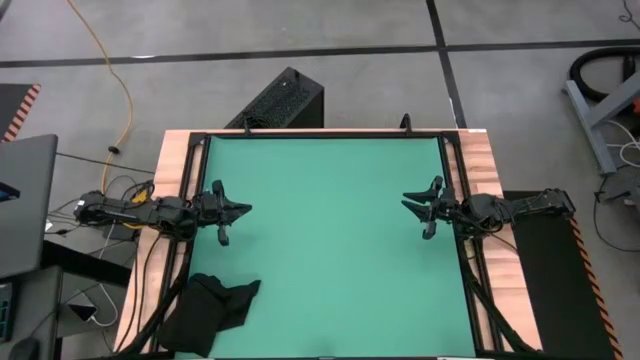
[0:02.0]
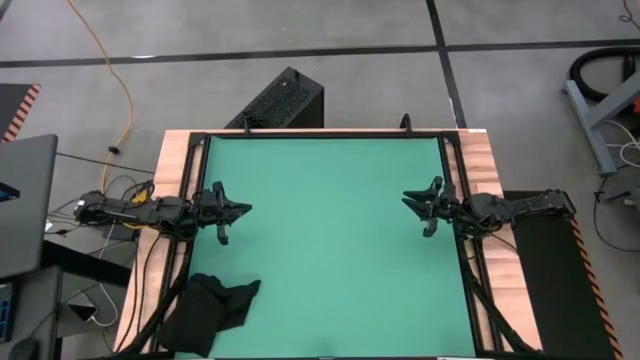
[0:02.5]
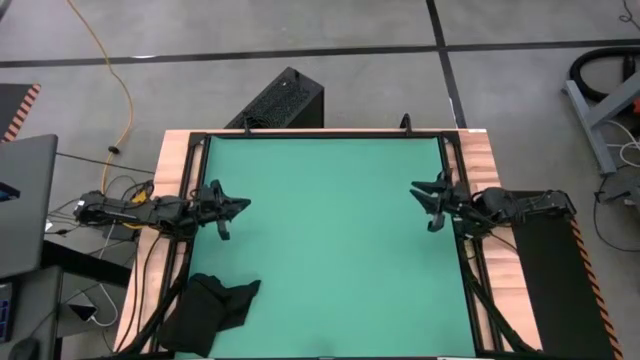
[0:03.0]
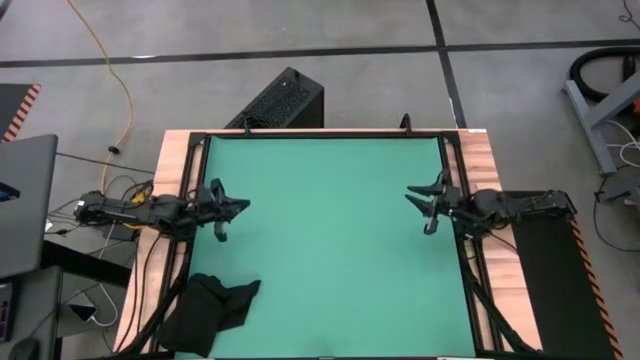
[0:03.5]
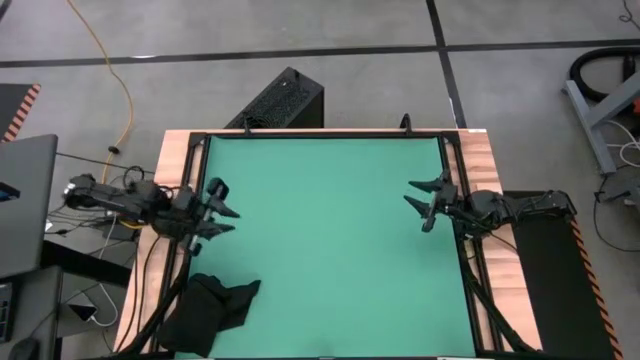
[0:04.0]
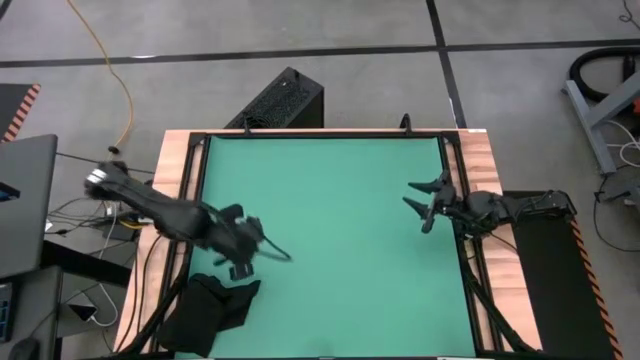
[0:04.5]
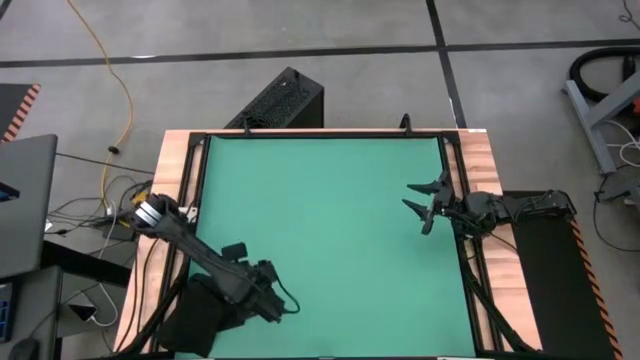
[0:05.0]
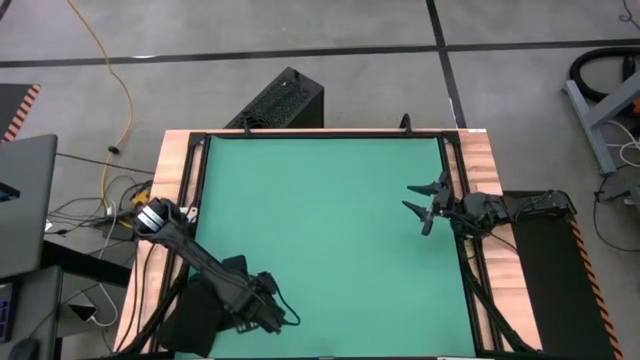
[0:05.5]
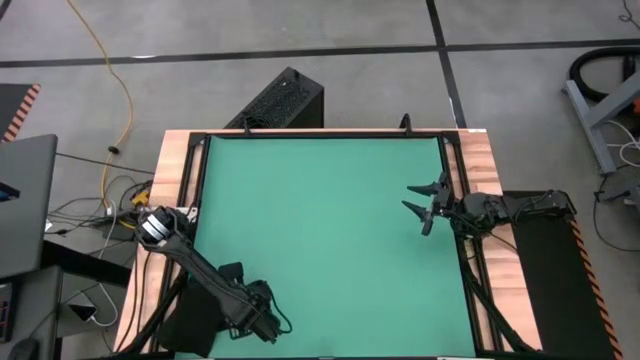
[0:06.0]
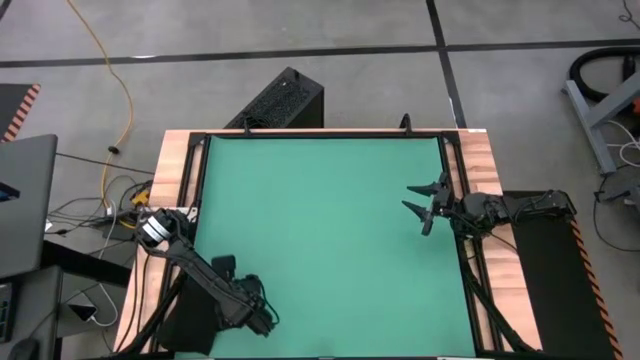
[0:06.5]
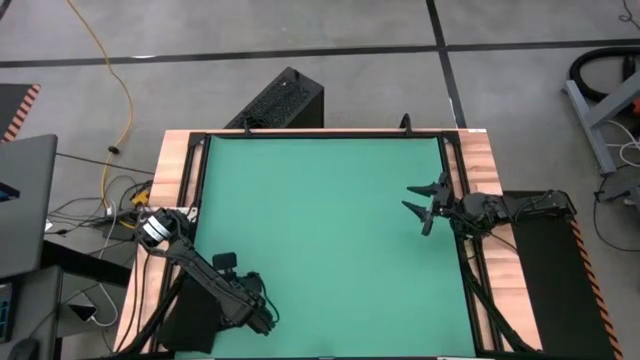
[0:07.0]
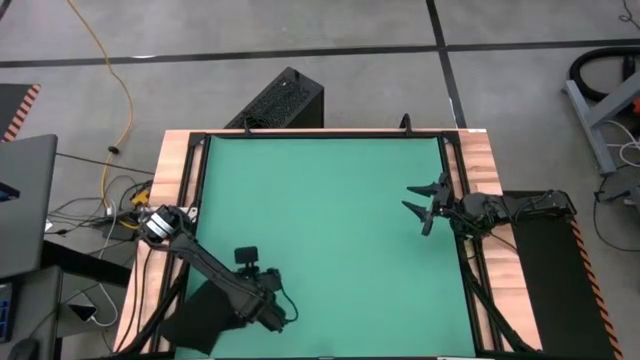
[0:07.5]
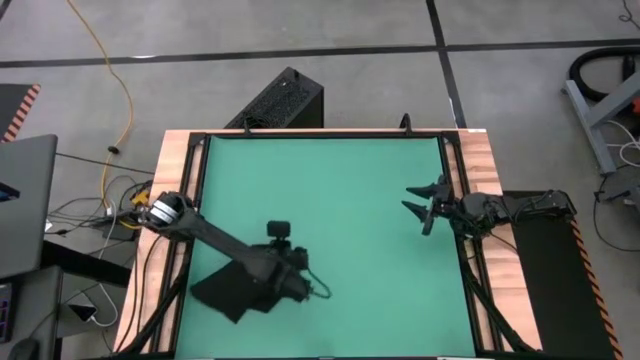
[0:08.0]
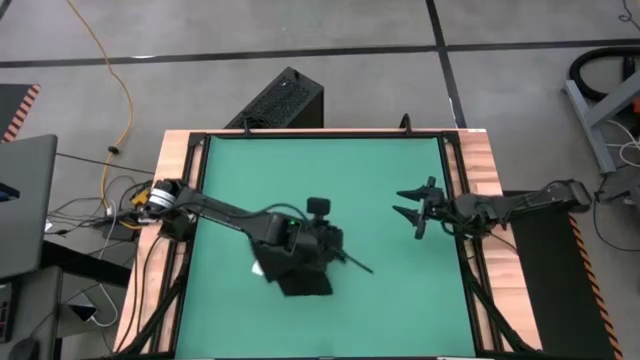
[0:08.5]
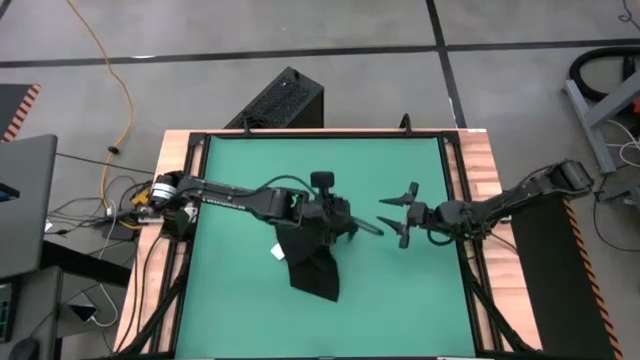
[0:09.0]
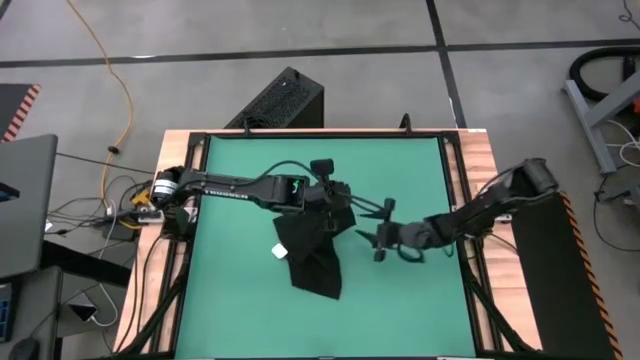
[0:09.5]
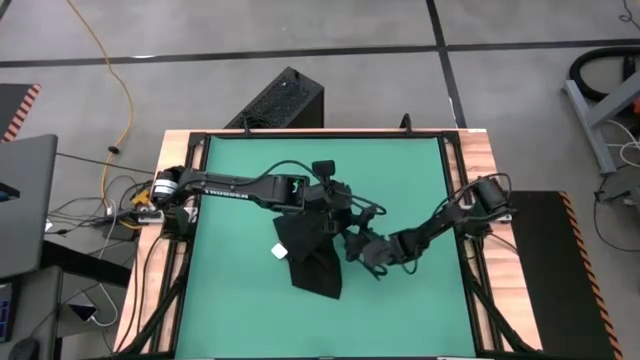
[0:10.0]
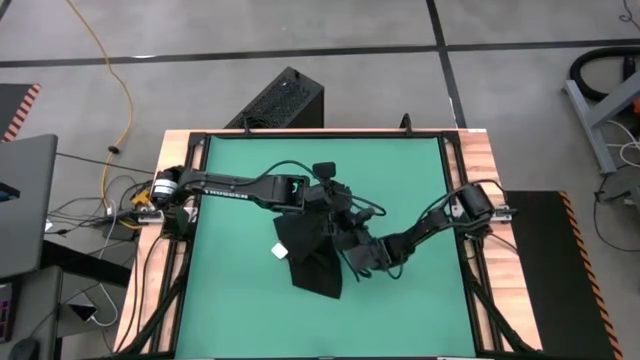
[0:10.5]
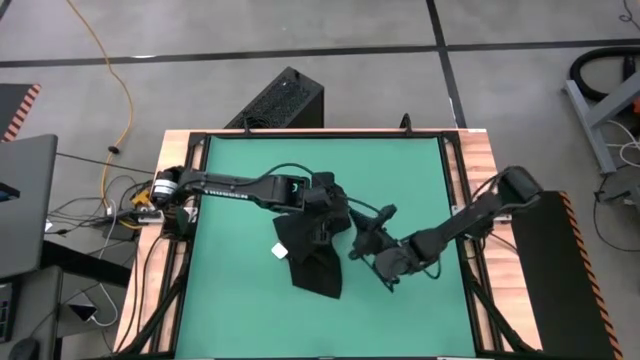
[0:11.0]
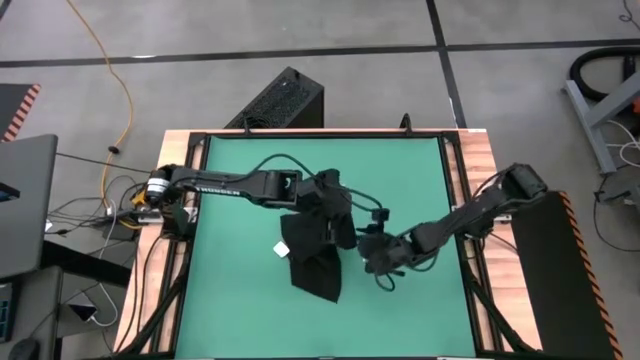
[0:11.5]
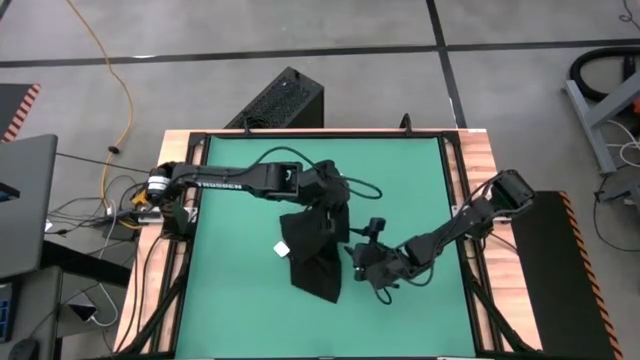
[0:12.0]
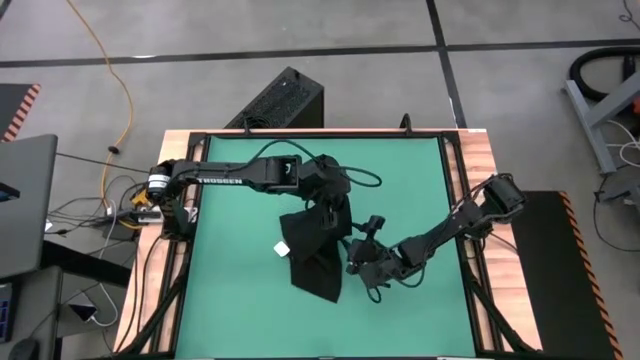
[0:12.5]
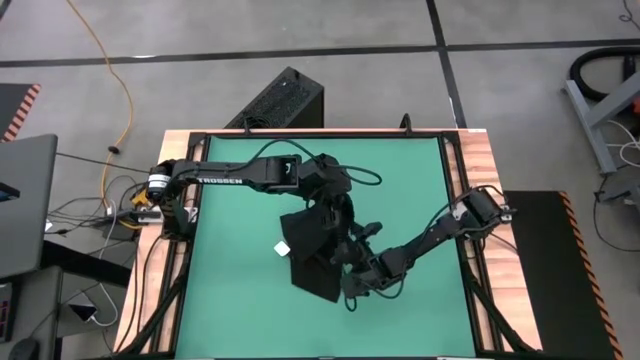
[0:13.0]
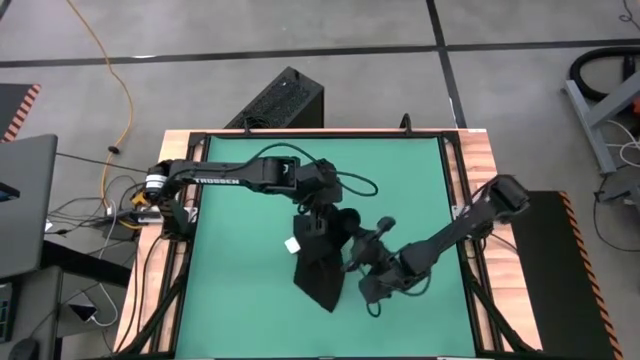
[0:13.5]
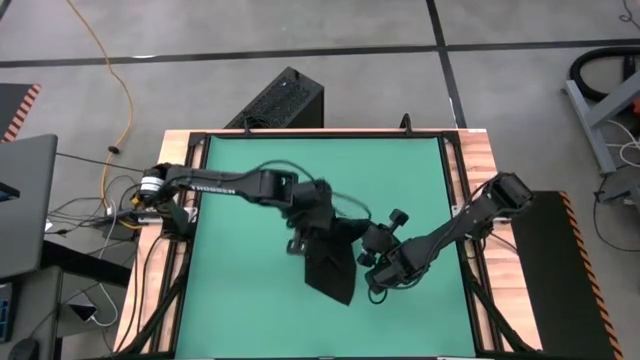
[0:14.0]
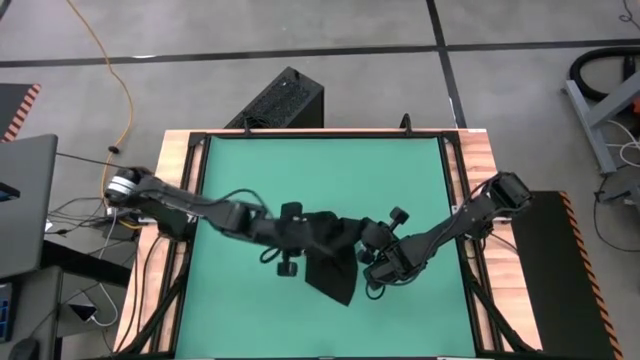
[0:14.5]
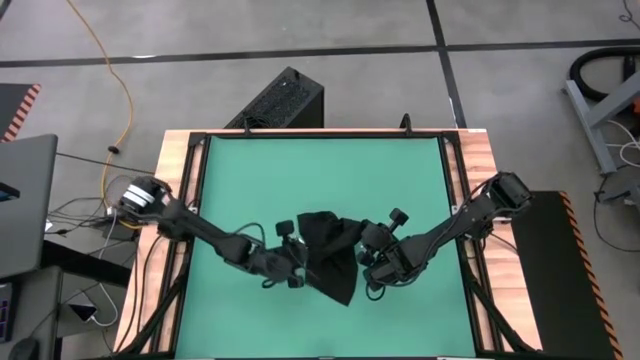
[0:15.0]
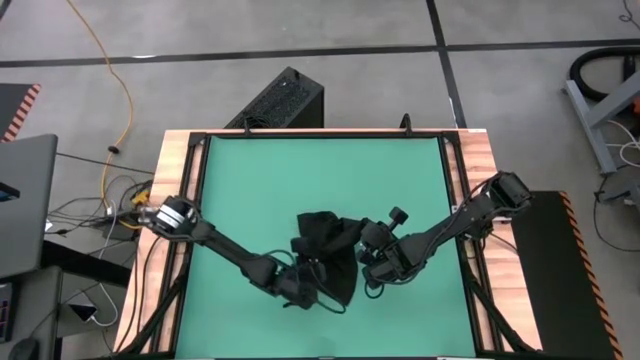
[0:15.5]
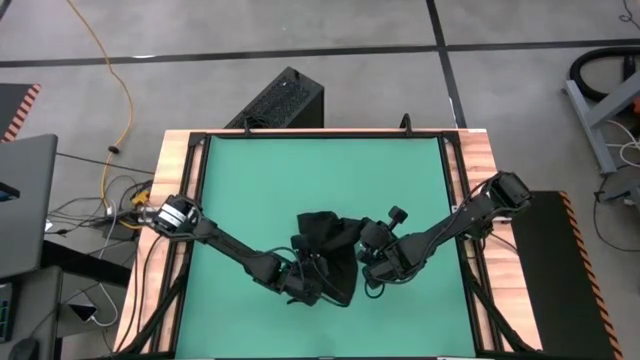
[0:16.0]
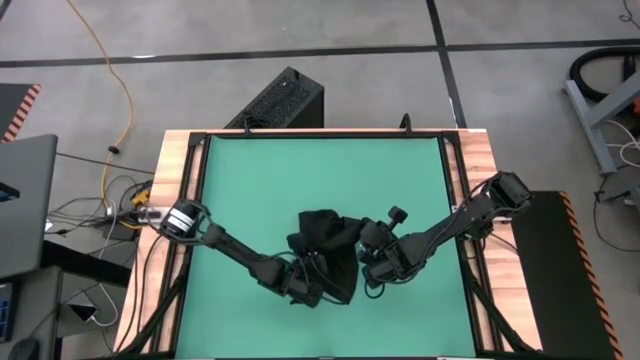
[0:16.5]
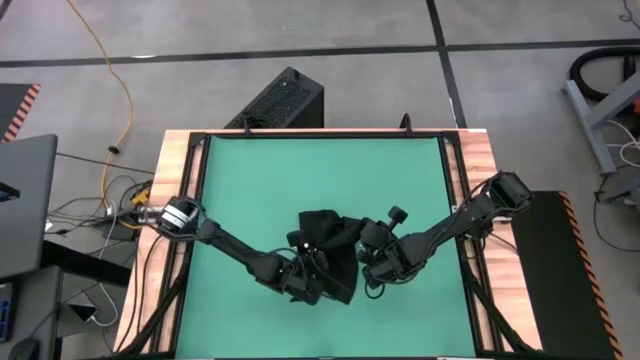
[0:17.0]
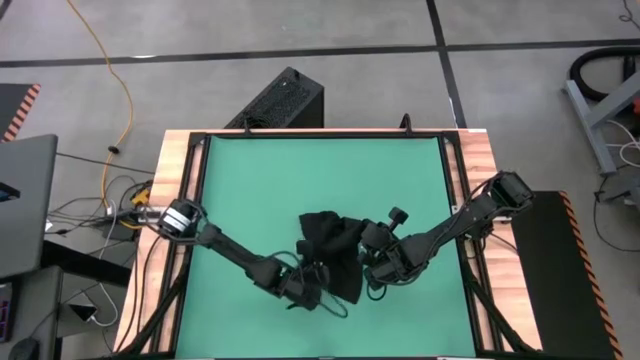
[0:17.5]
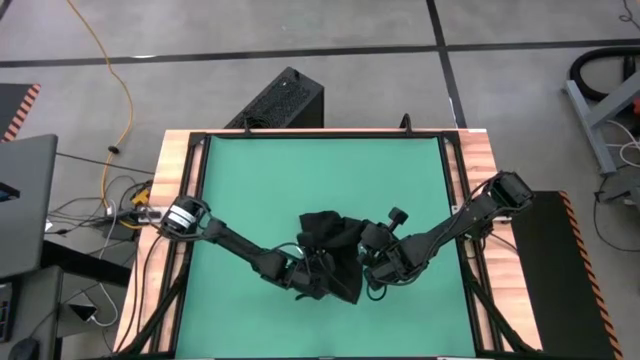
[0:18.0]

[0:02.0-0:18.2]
Task: Roll towel into tight, uniform cylinder
Roll the black towel
